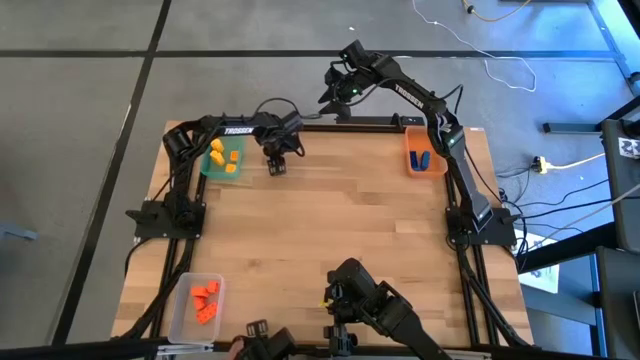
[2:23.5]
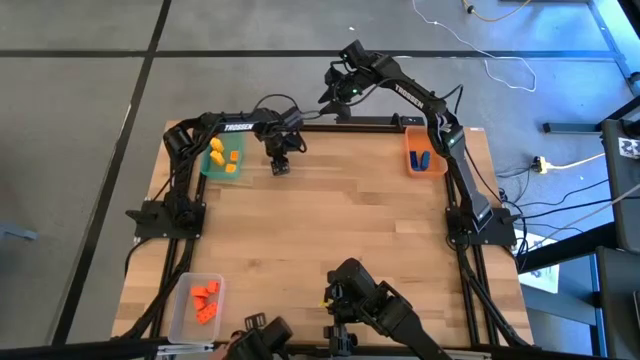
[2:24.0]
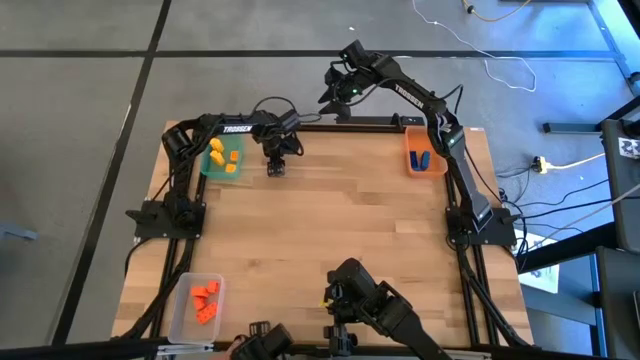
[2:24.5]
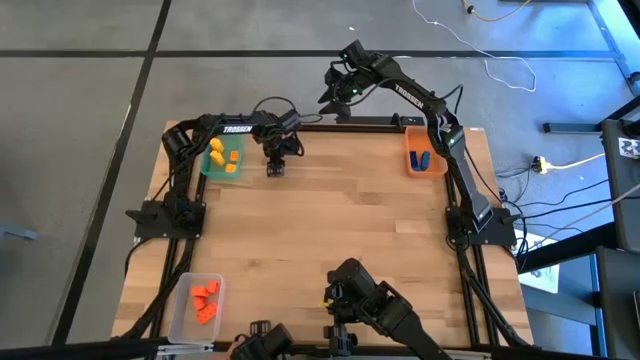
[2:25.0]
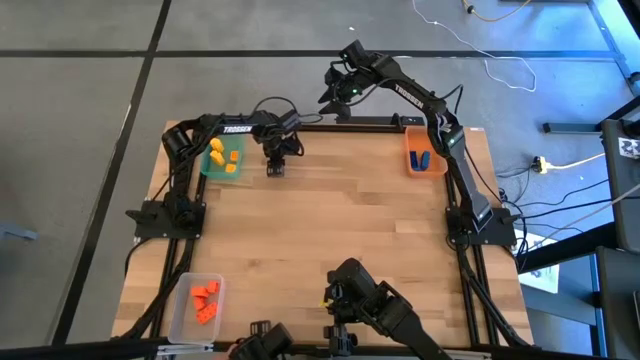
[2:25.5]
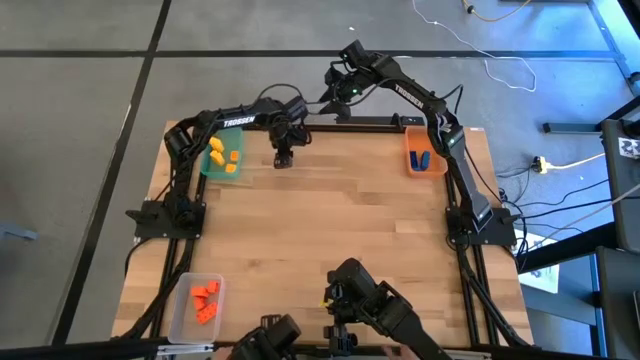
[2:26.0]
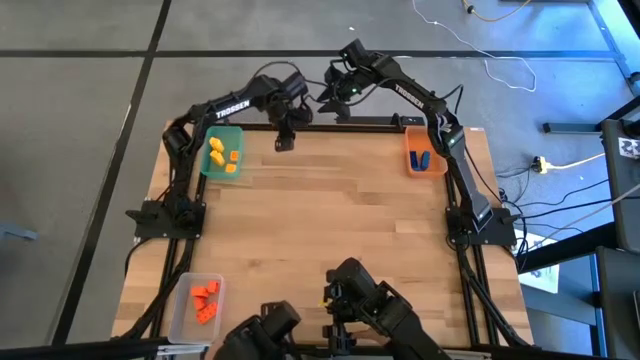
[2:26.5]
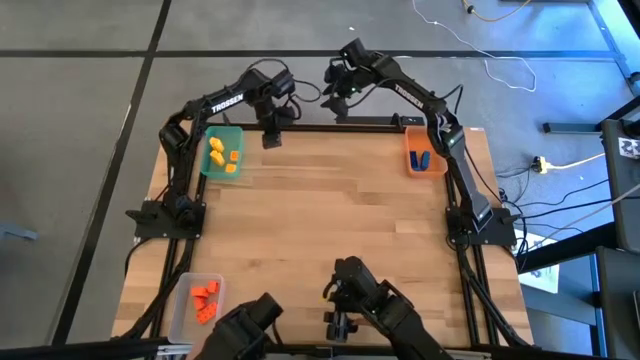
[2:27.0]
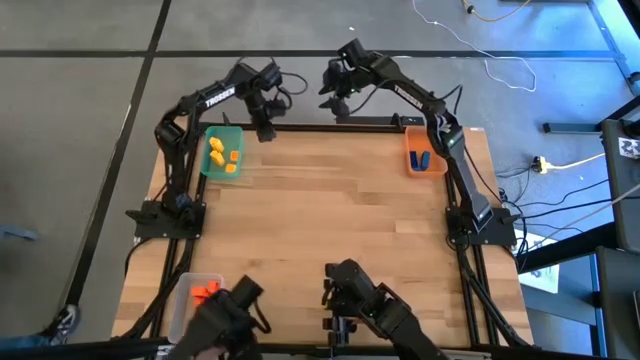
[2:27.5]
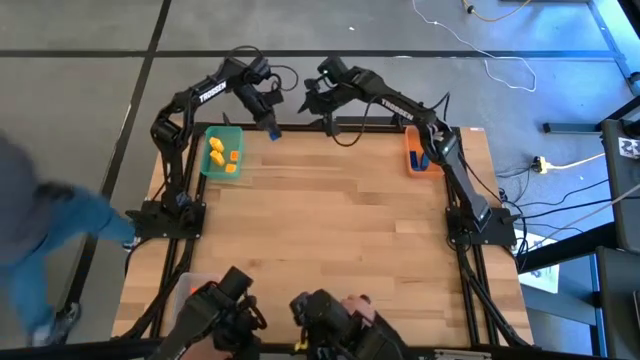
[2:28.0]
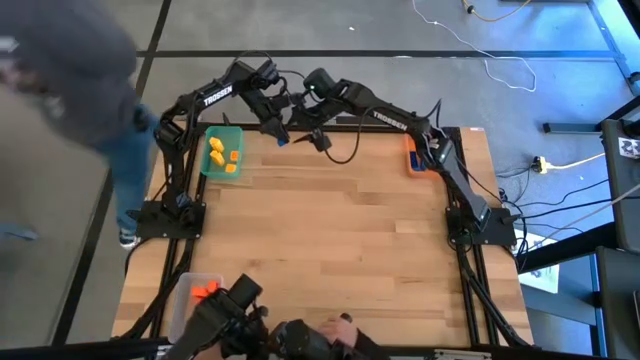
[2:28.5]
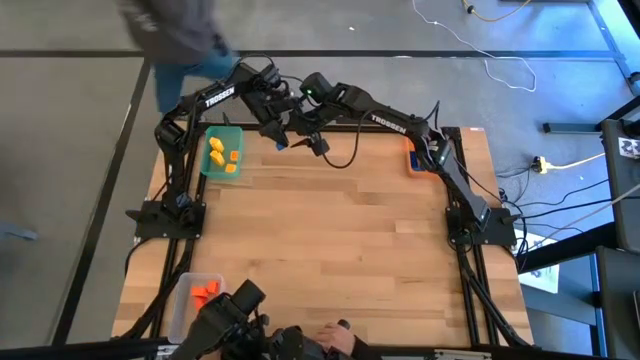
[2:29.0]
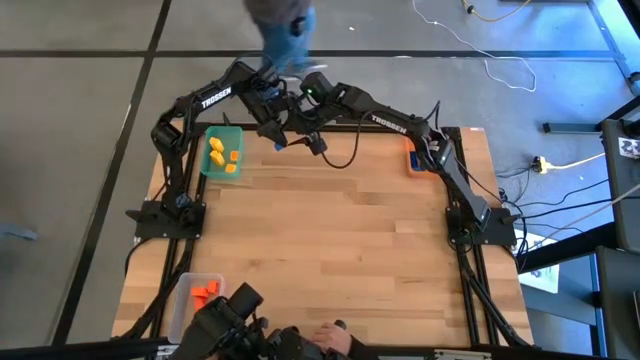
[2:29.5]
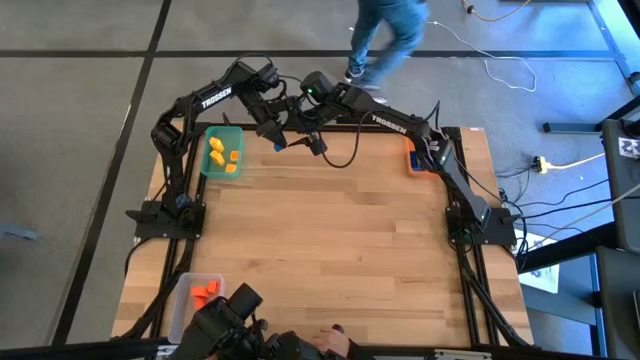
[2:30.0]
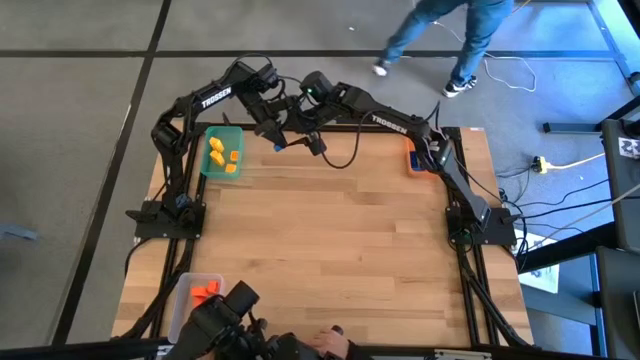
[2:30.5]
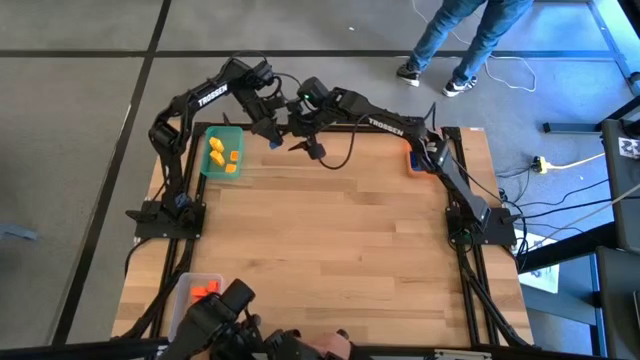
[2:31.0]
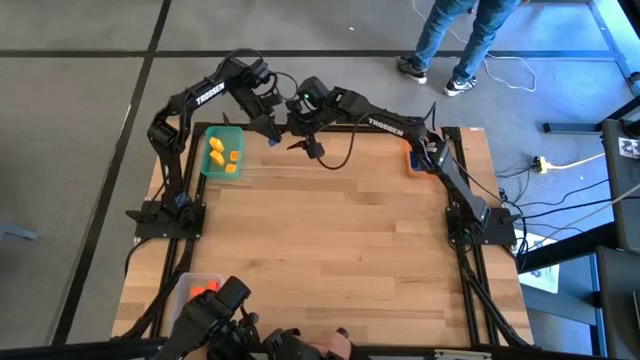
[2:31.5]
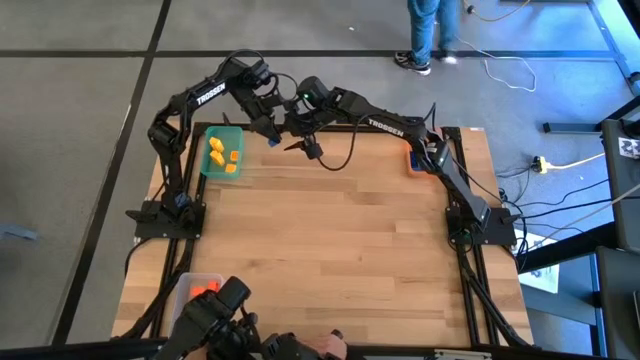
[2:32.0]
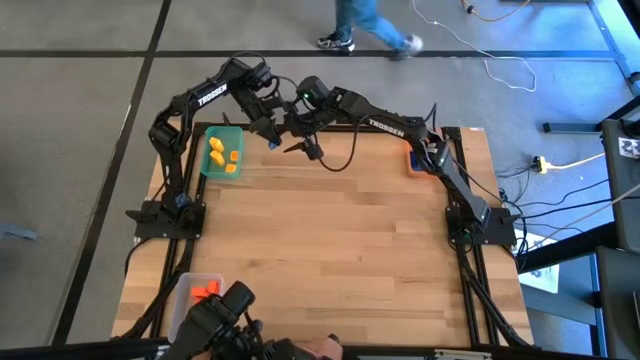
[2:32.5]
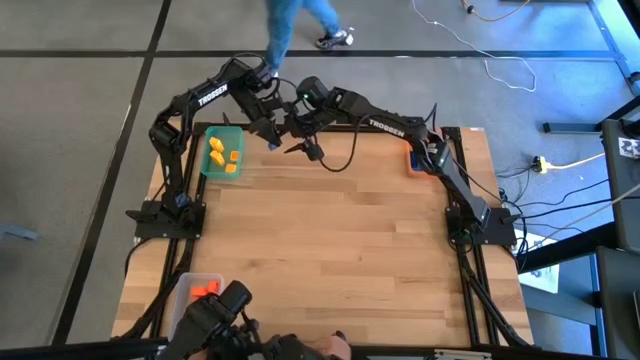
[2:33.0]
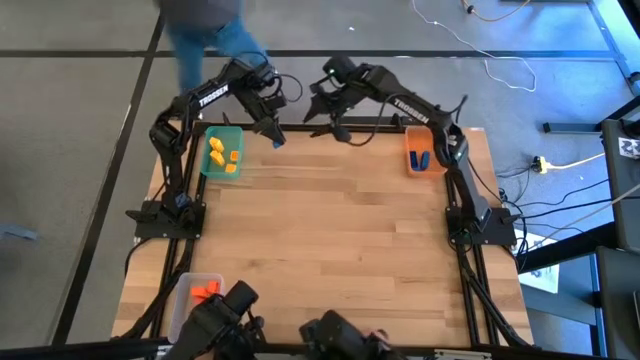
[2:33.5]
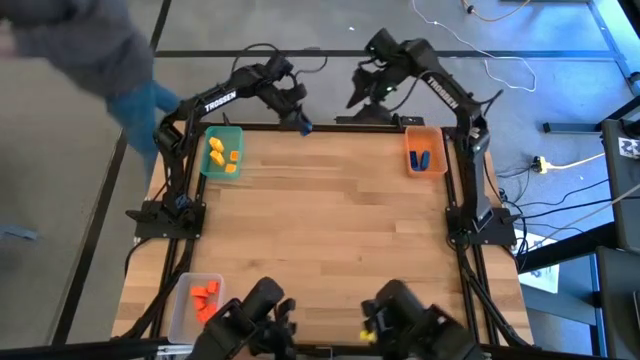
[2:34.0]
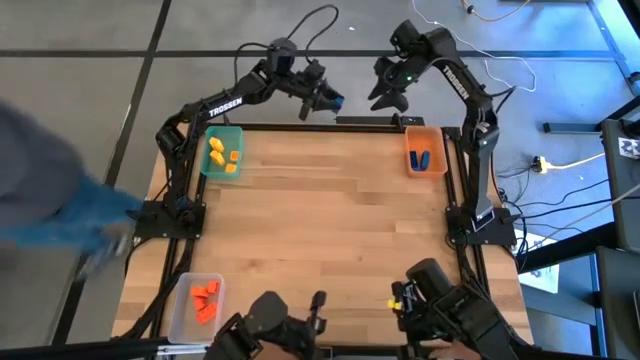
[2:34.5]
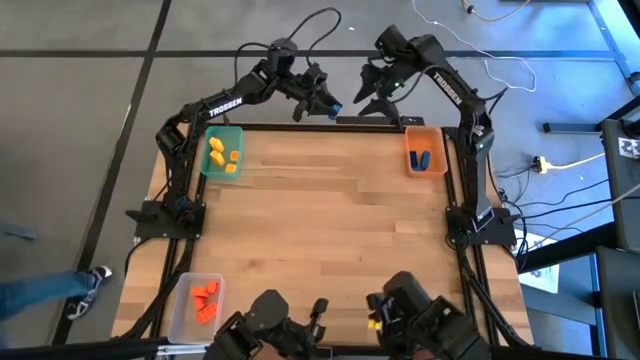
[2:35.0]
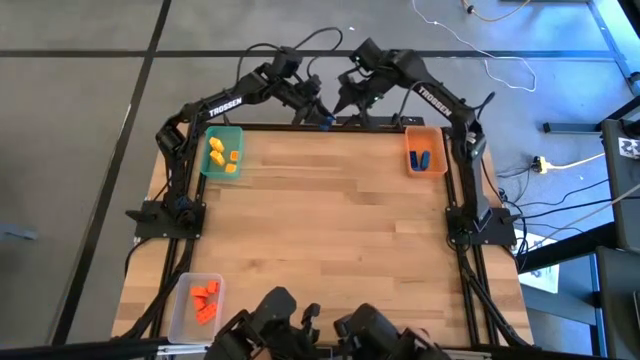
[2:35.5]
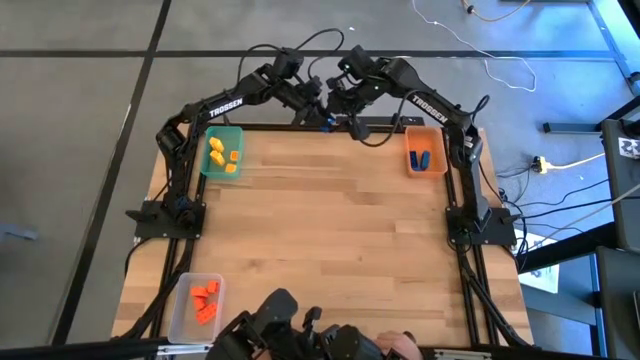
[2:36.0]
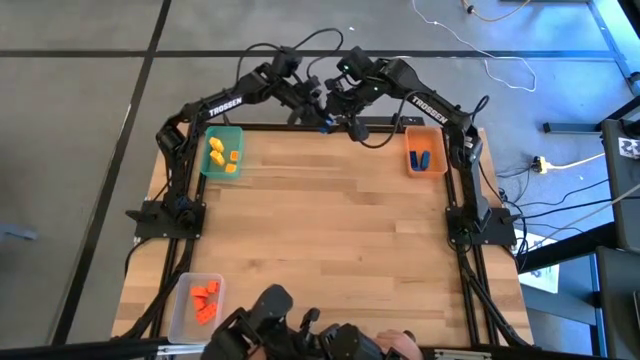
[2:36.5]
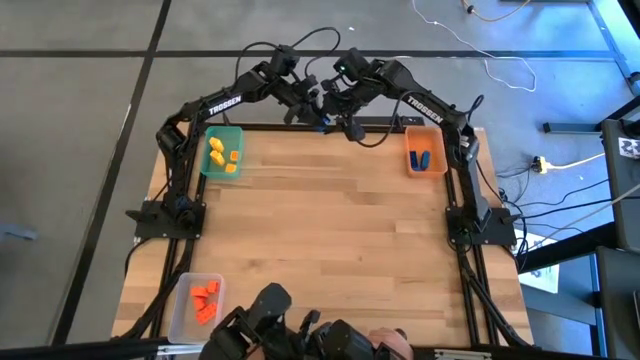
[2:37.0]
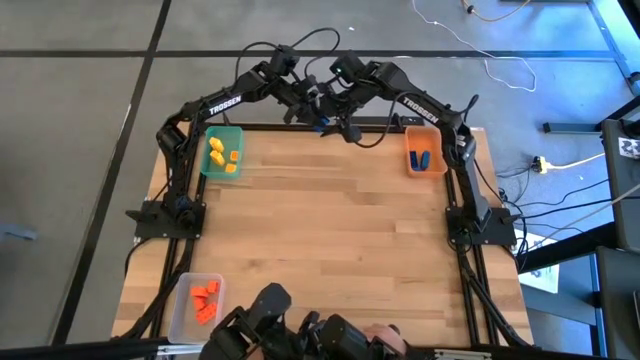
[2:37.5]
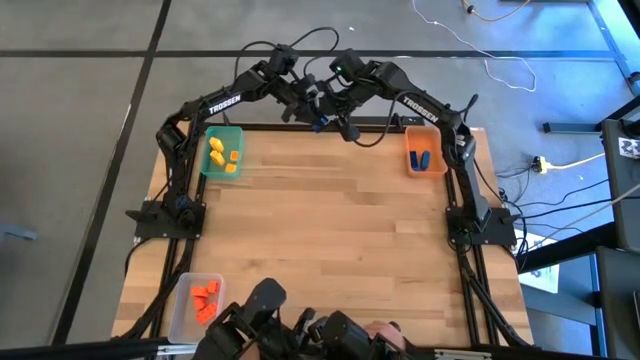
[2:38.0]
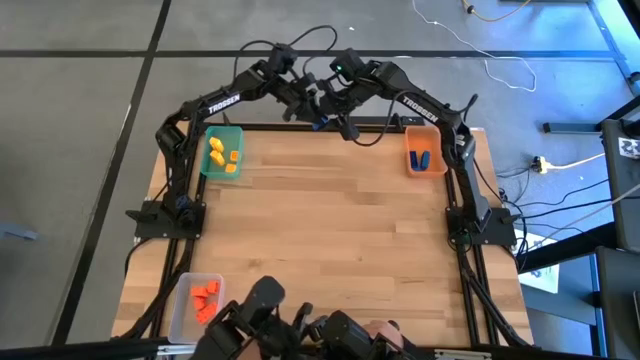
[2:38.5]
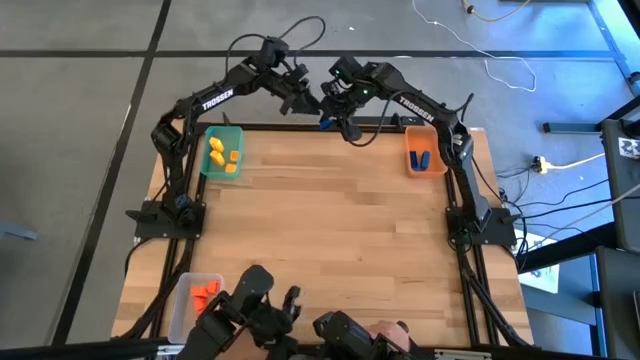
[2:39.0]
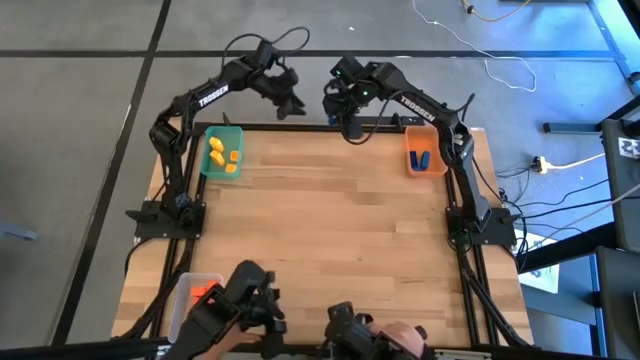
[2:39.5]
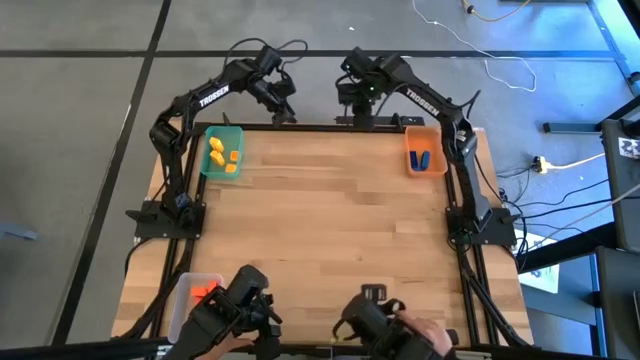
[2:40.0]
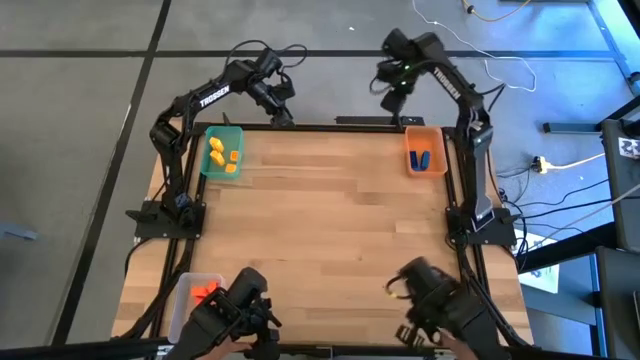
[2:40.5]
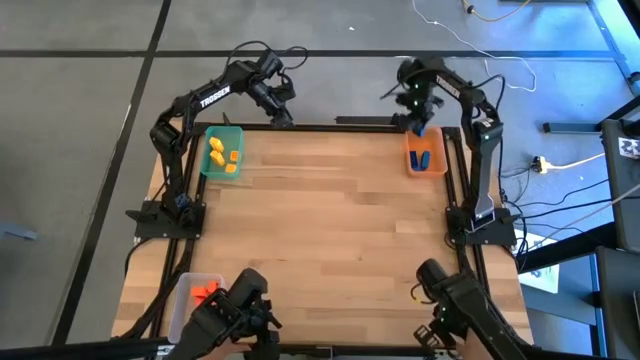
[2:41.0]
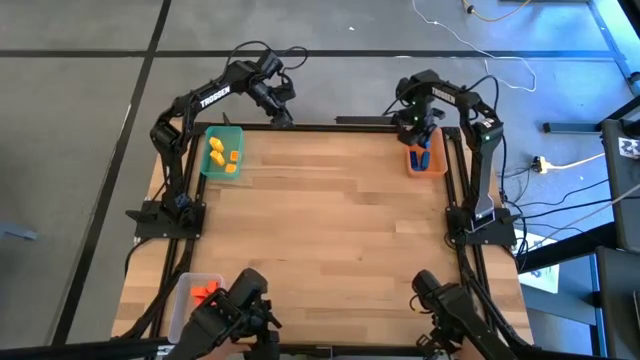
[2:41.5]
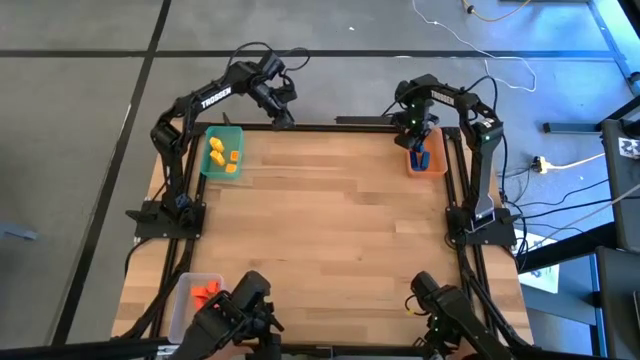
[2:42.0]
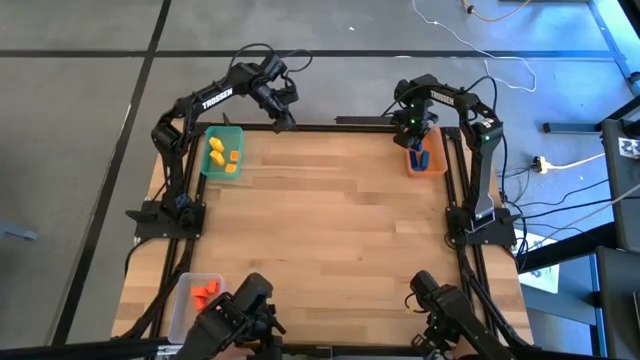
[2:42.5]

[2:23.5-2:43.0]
Task: Sort & place blocks by color
Put the blue game piece into the orange bin

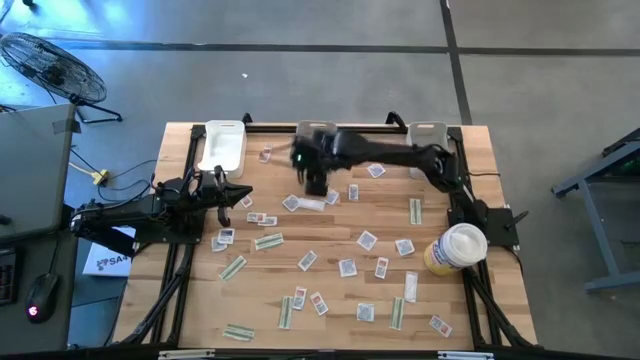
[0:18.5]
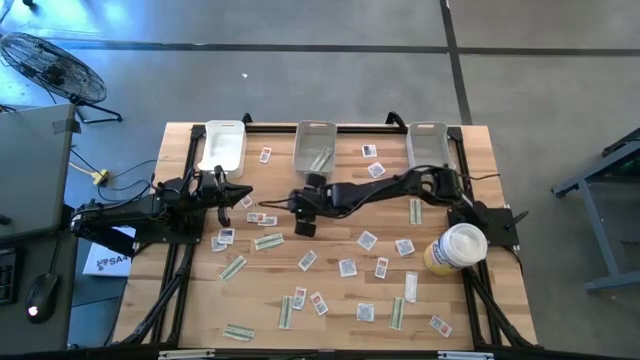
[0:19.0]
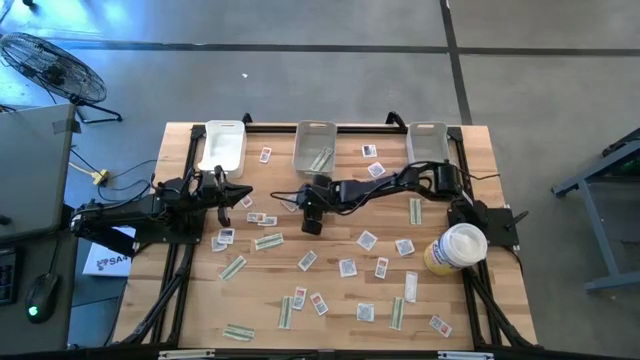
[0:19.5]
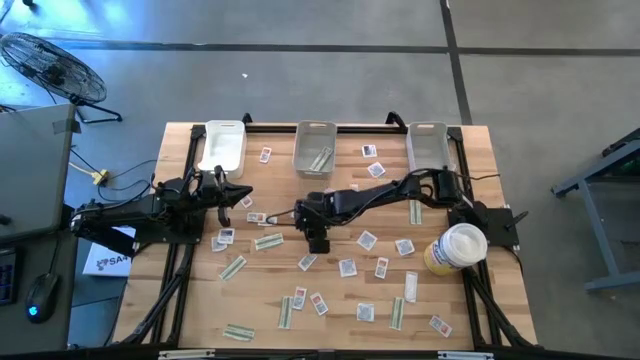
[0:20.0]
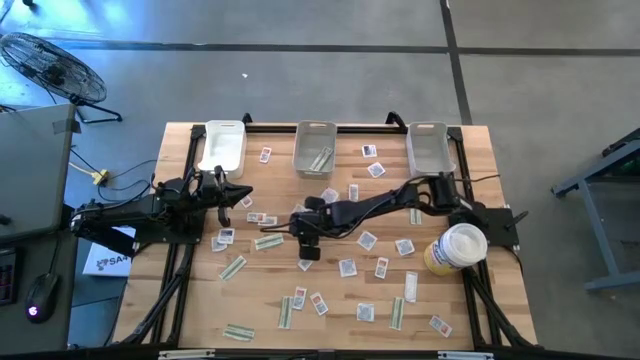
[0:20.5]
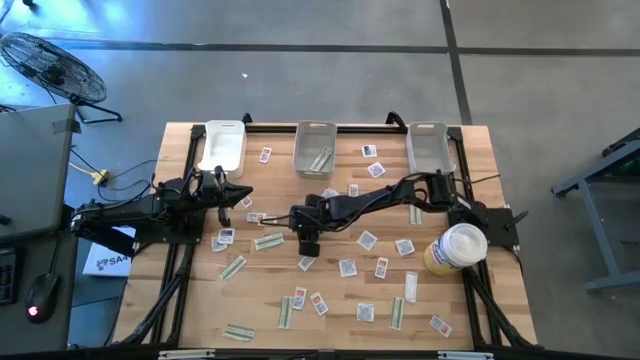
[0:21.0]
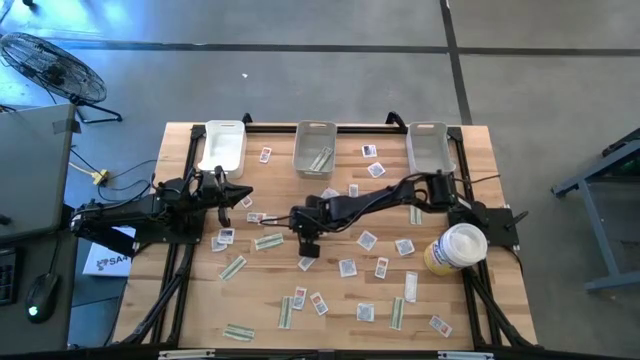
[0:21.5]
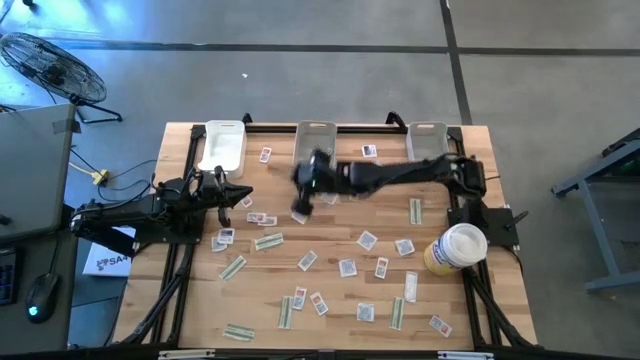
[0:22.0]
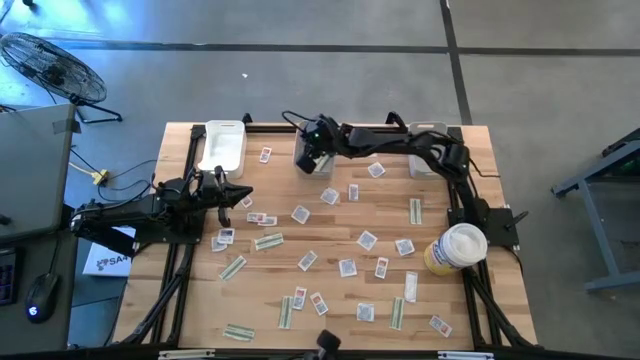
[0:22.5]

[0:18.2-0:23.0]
Task: Pick & Place First Aid Supplies
Put the green pad into the left gray bin
